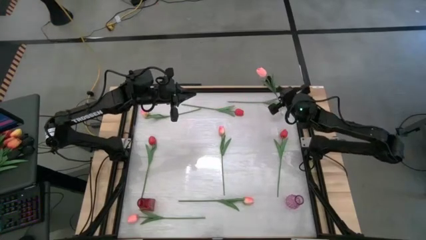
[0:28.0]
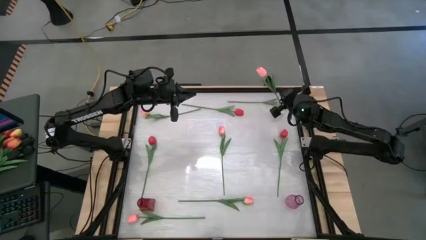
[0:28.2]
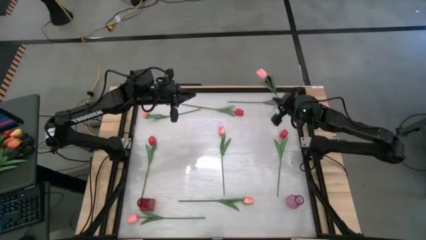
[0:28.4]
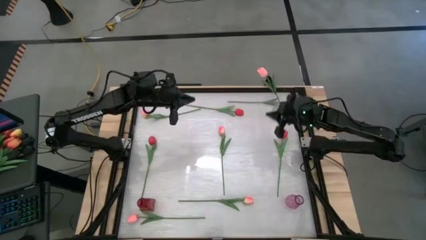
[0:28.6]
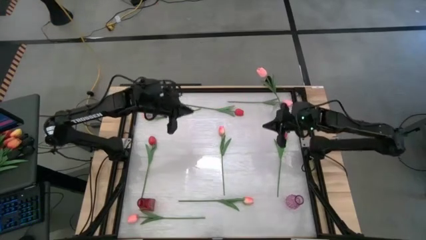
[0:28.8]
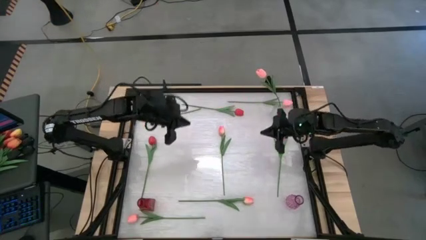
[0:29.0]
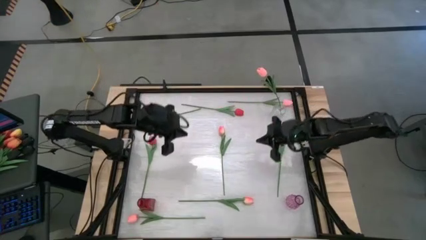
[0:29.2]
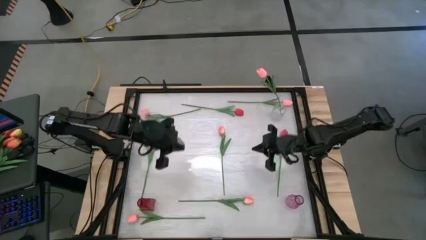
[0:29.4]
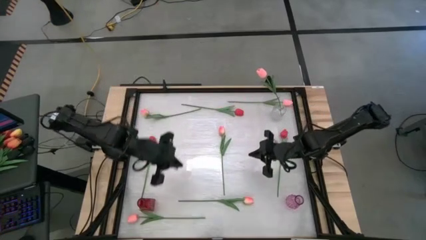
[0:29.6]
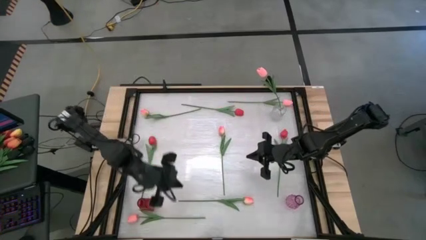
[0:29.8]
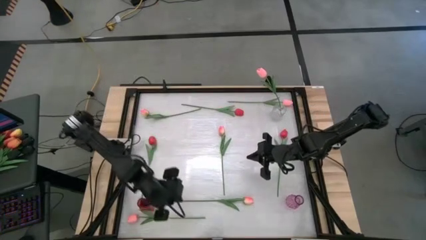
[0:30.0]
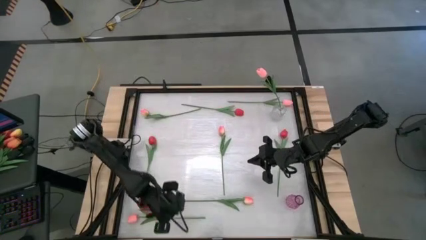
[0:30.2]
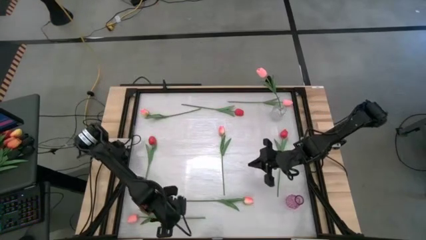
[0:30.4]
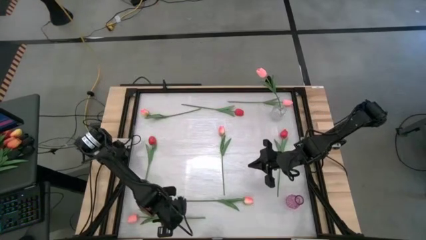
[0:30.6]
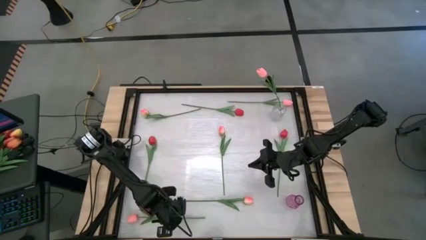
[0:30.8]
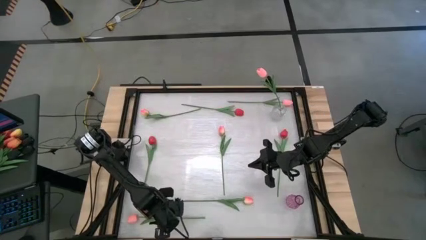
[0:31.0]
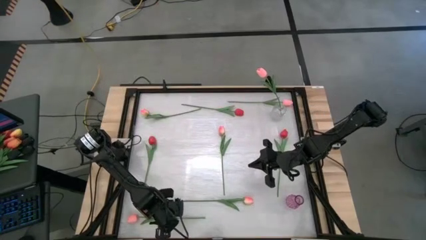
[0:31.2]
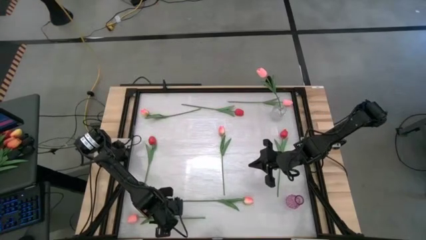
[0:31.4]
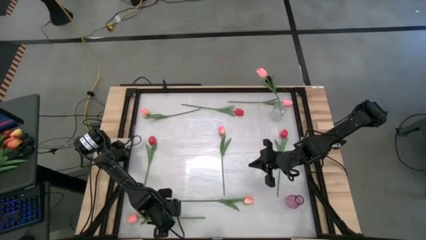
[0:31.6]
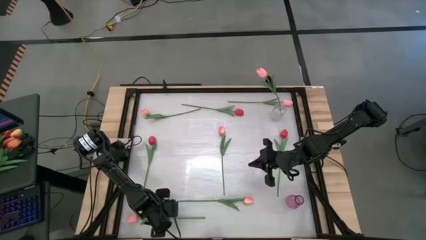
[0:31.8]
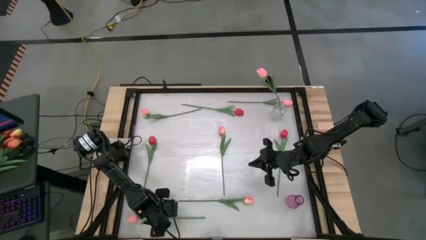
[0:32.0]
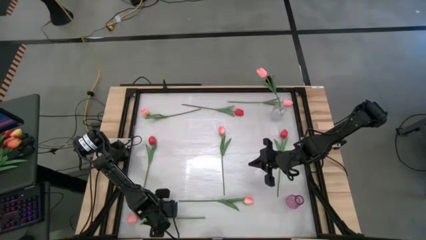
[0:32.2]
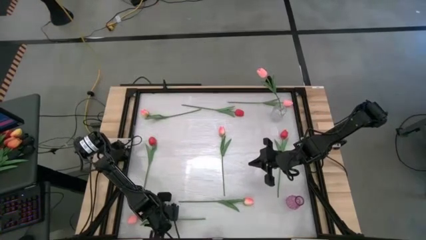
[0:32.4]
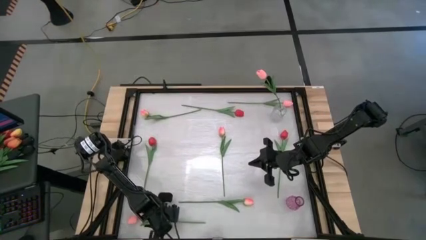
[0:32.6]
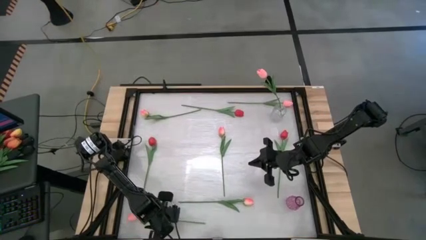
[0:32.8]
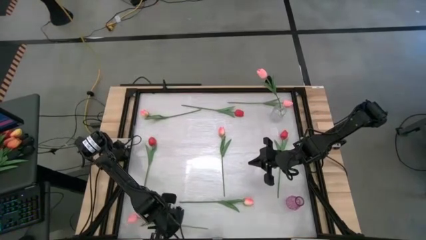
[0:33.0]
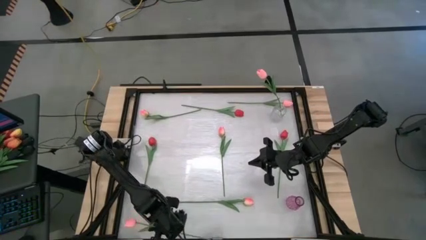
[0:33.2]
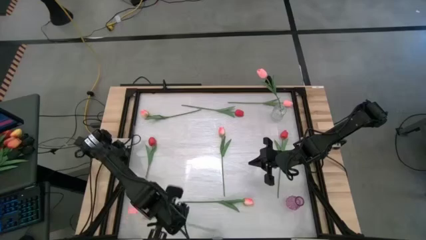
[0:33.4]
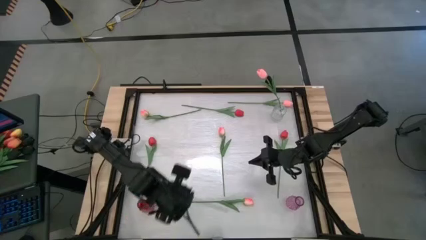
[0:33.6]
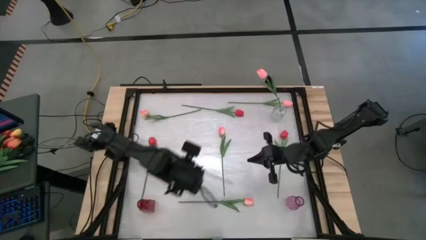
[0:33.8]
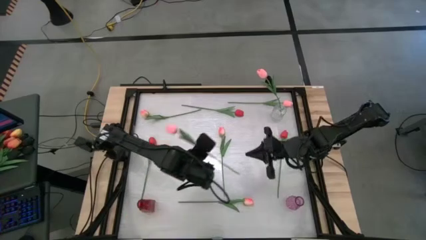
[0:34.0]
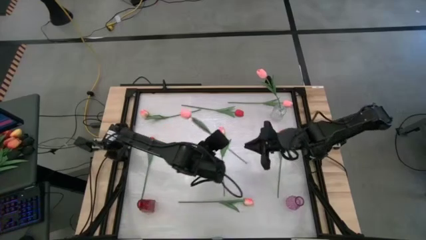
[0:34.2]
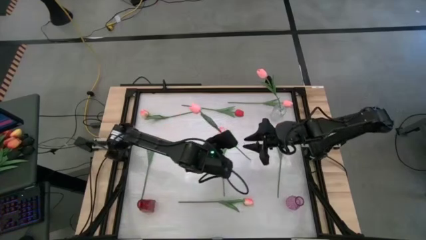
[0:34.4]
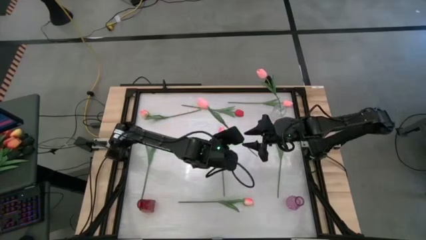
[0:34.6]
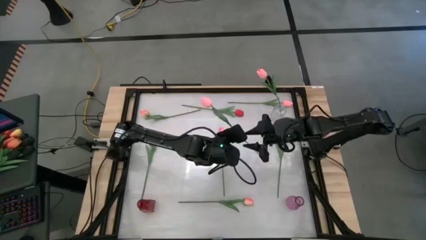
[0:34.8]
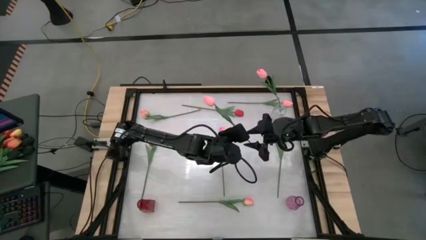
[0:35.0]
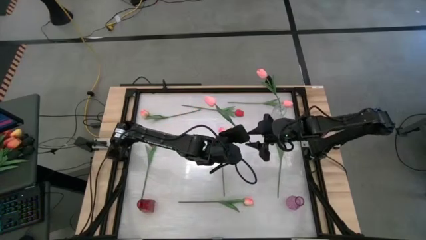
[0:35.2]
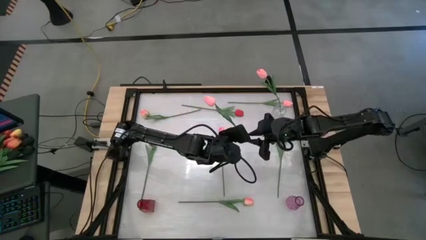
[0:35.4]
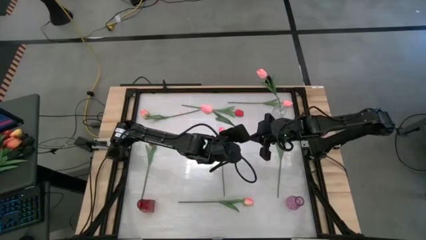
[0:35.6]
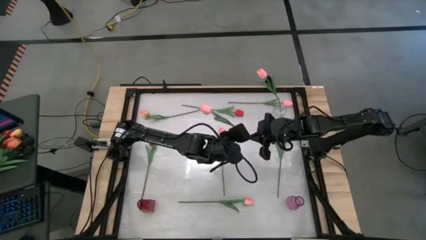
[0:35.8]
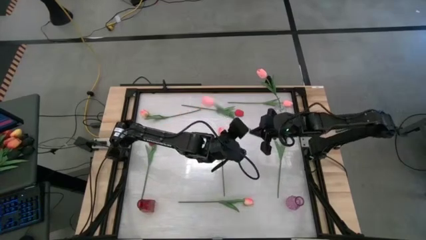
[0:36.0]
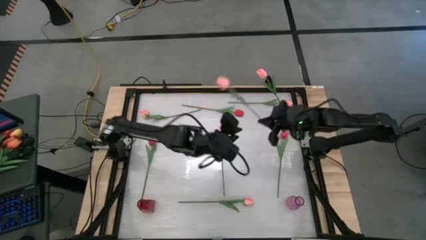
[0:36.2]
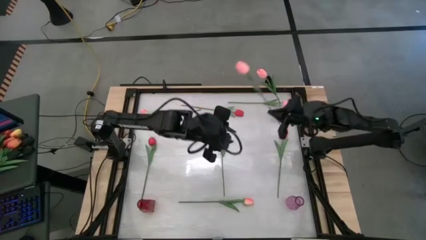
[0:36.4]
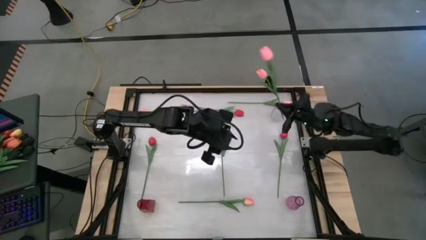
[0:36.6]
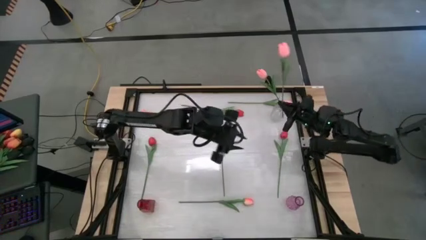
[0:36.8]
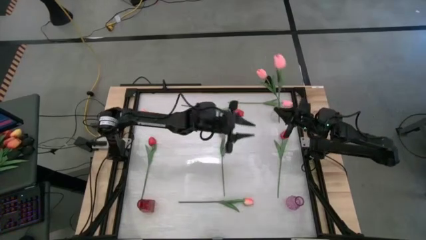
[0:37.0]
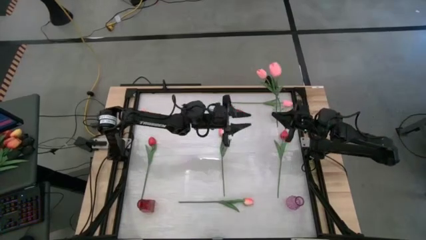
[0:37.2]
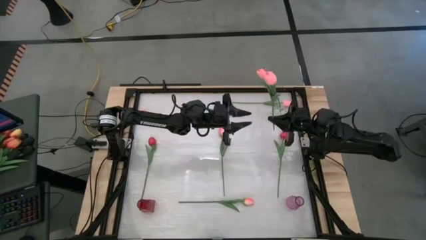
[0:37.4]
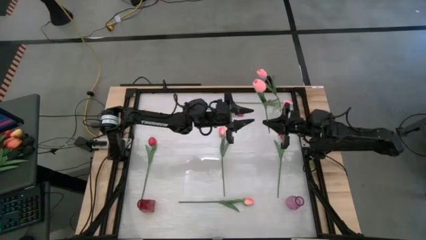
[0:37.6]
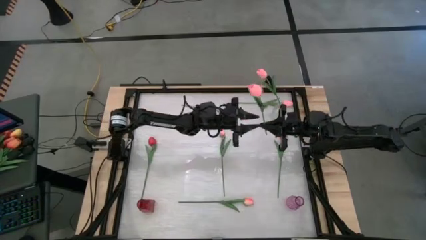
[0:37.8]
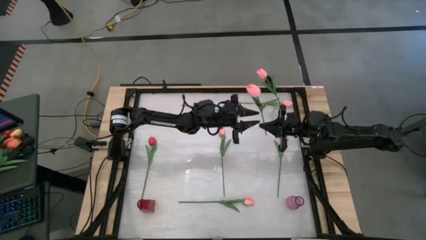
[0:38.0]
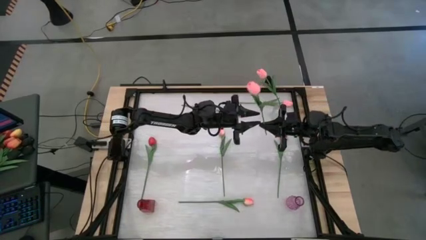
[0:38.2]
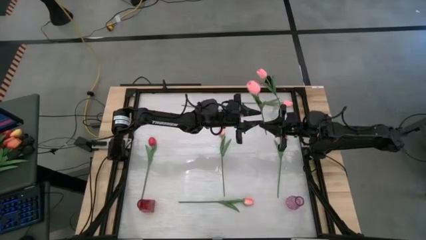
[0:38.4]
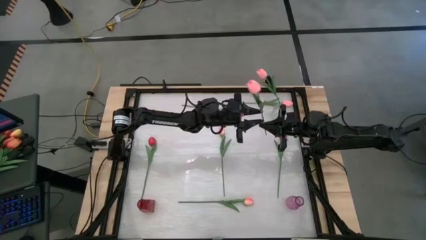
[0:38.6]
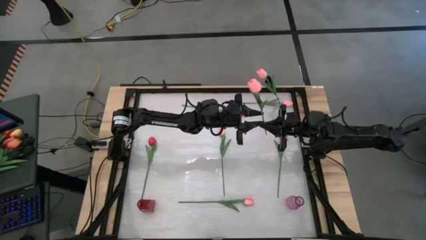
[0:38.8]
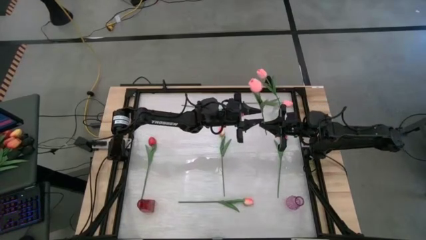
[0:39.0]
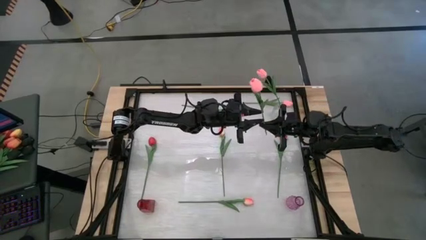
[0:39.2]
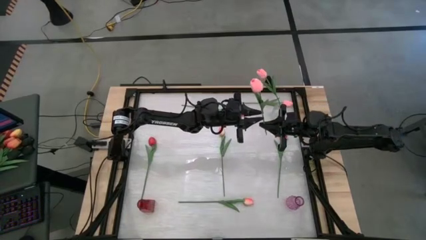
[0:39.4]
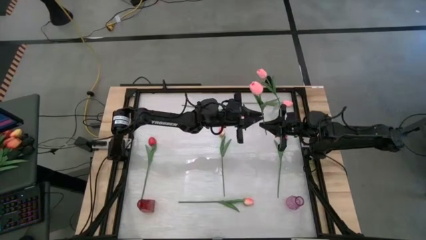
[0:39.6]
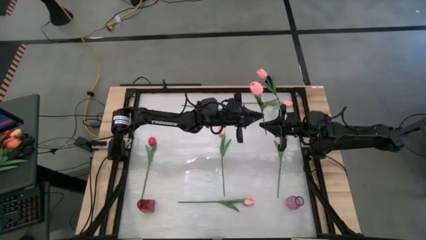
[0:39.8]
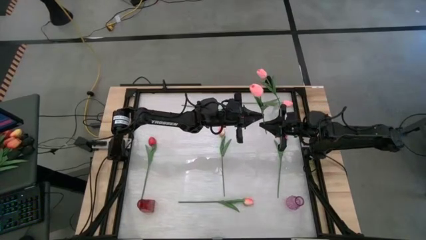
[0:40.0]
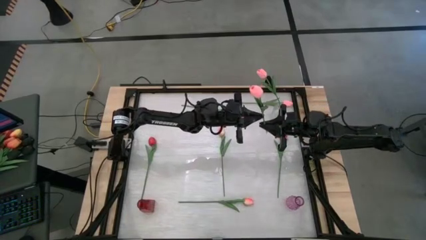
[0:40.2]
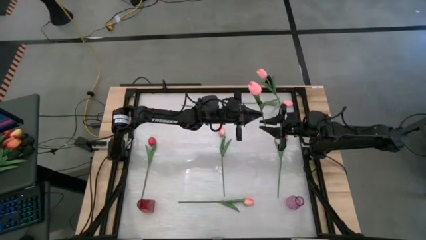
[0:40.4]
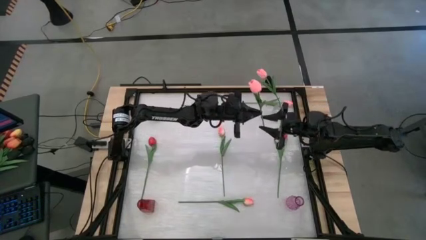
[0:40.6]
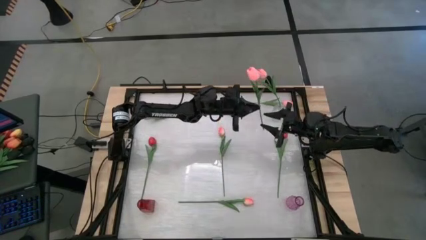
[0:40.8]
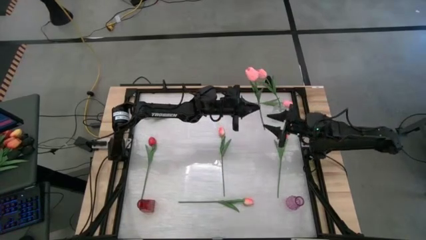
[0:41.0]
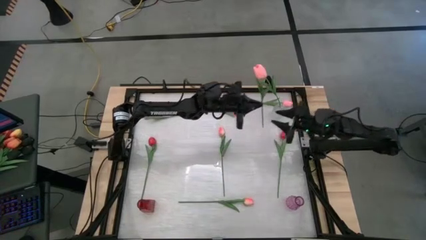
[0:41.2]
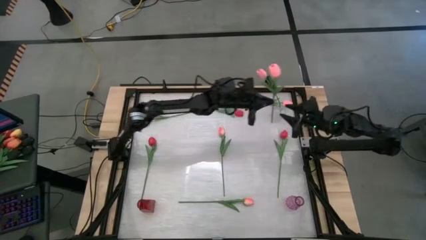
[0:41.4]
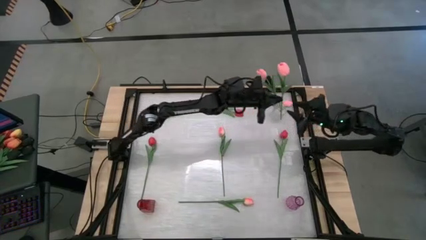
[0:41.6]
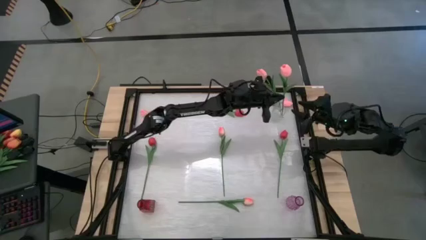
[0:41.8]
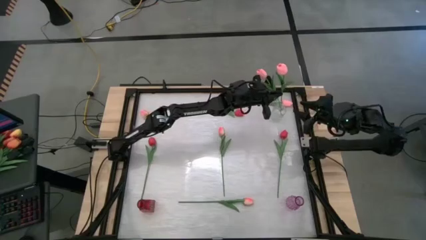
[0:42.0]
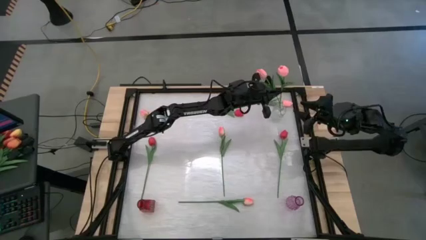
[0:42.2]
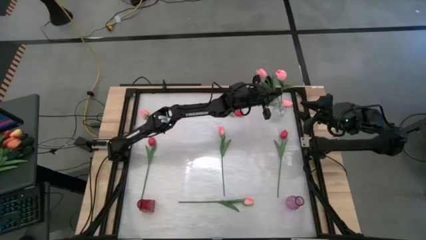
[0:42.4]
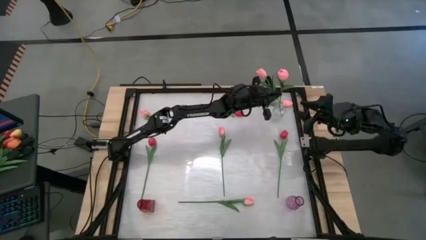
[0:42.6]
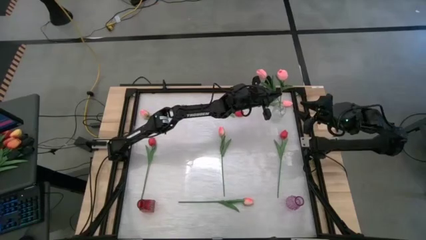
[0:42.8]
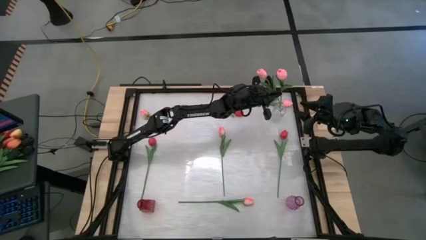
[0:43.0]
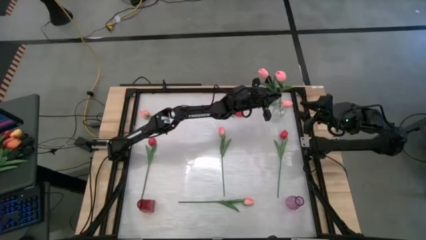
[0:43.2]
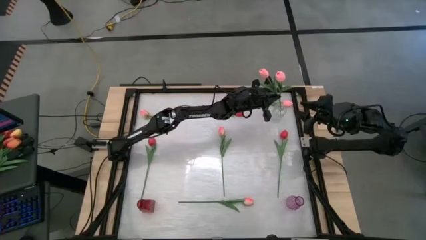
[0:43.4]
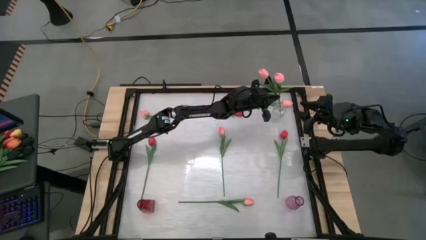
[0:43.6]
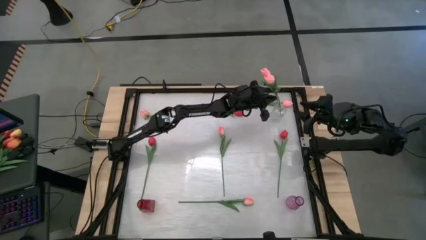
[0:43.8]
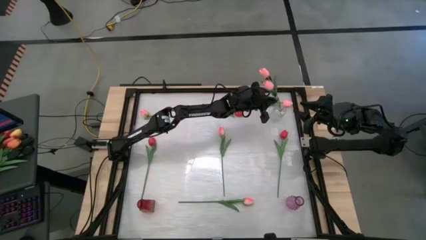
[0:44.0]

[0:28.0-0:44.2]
Task: Sort flowers into vase by color
Put the pink flower in the transparent vase
